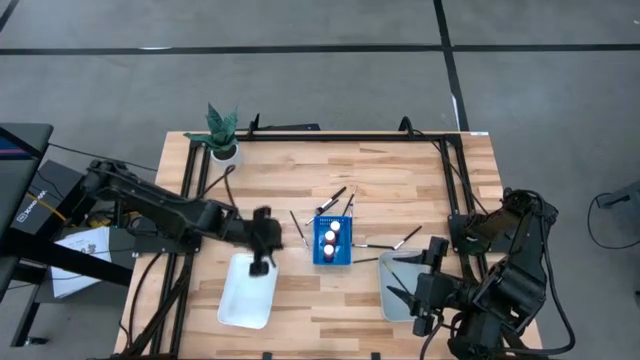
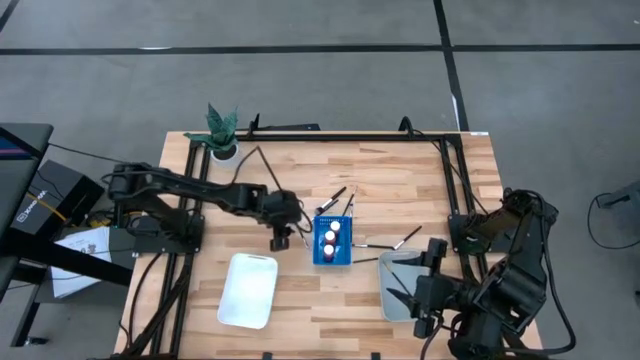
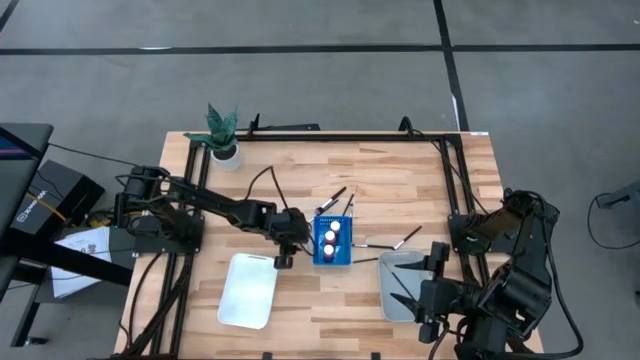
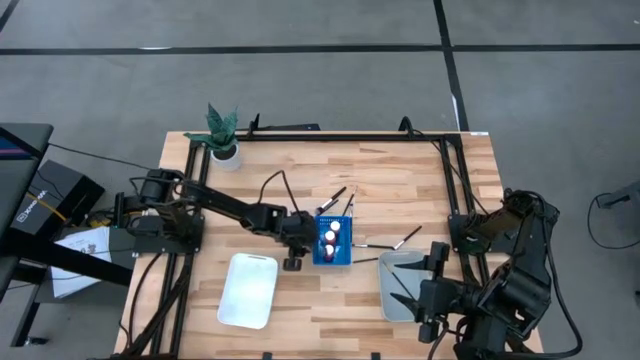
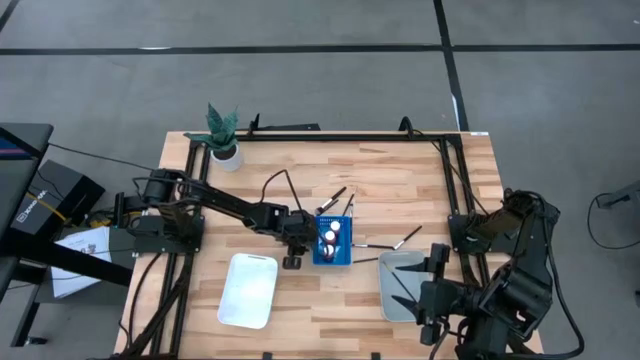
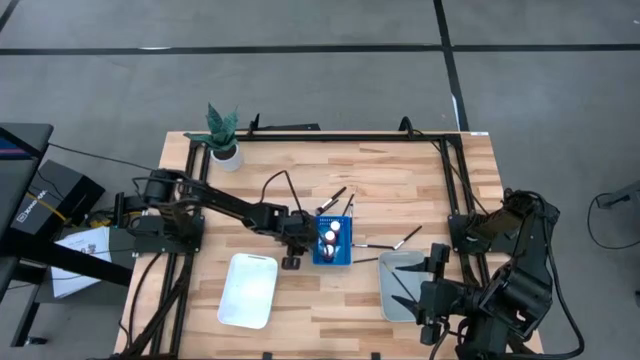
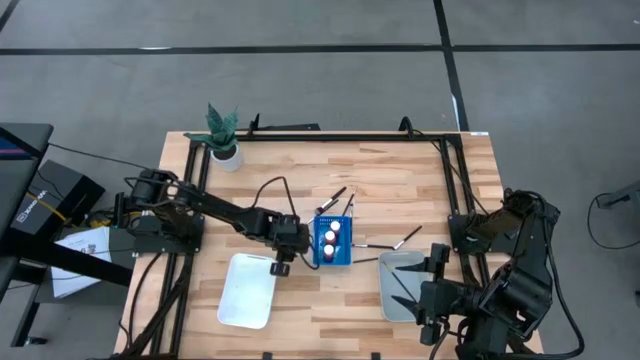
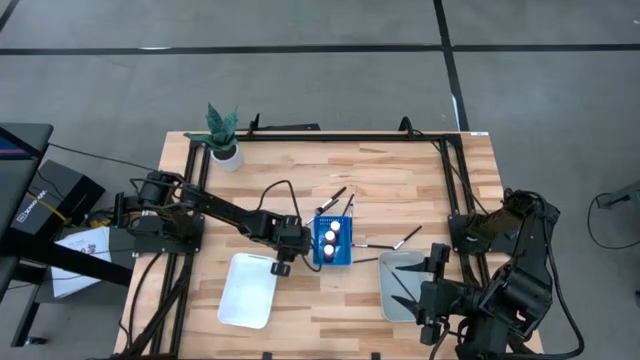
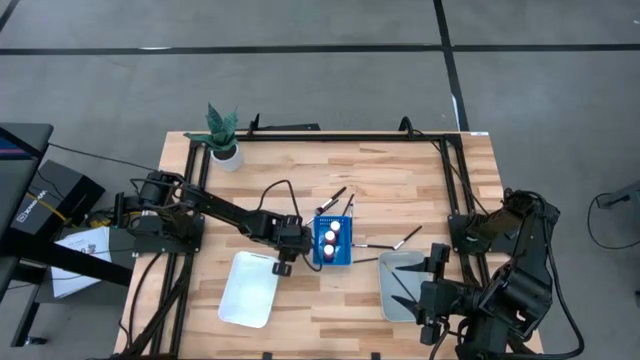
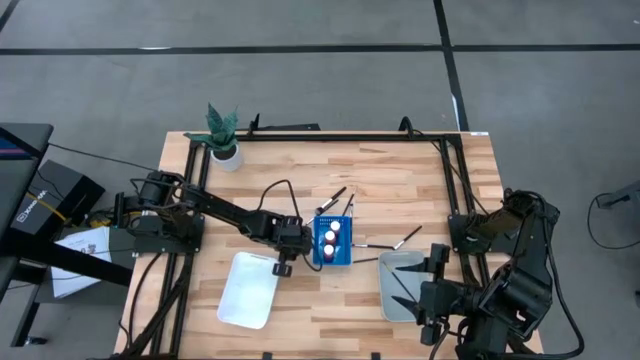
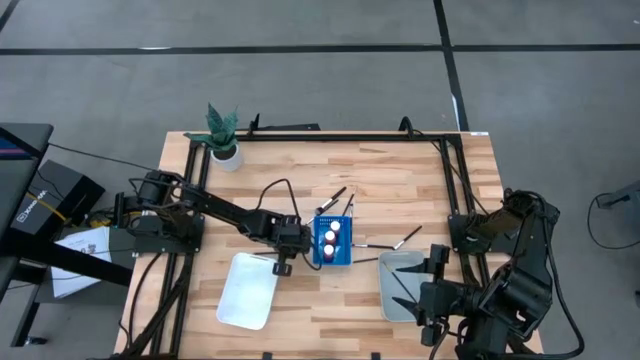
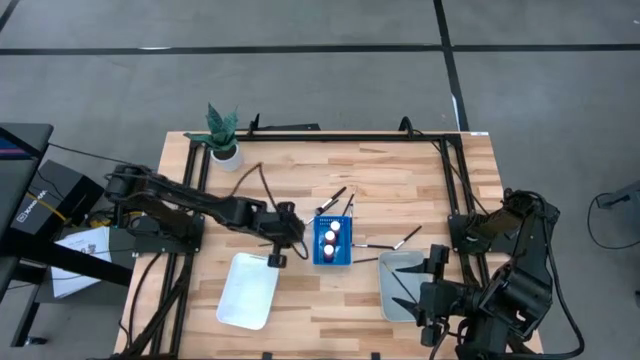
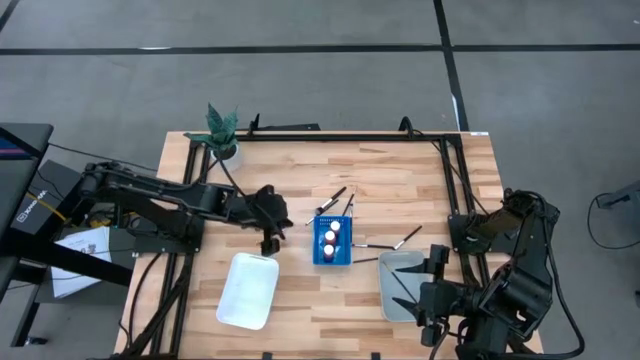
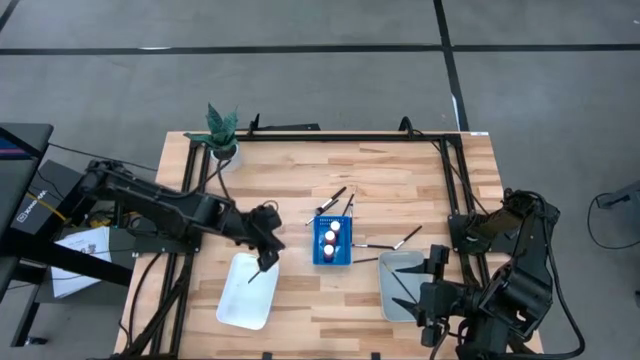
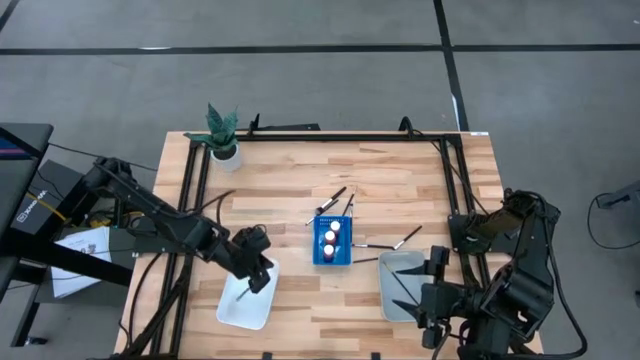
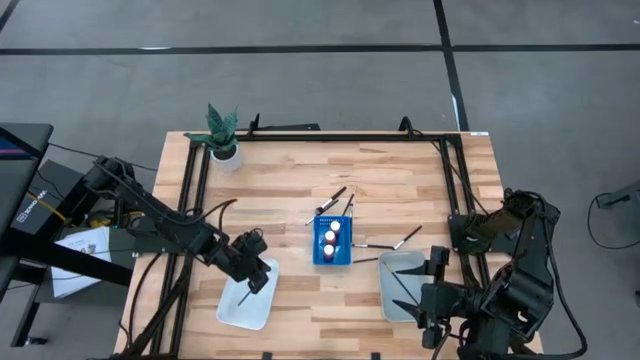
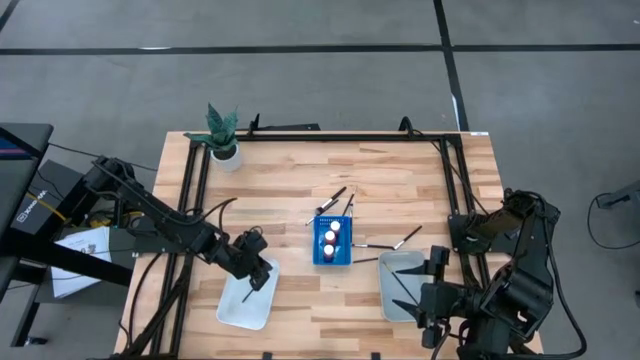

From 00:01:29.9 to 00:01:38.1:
Task: Pick & Place Paint Supplies
Put the left eyeshadow into the white bin

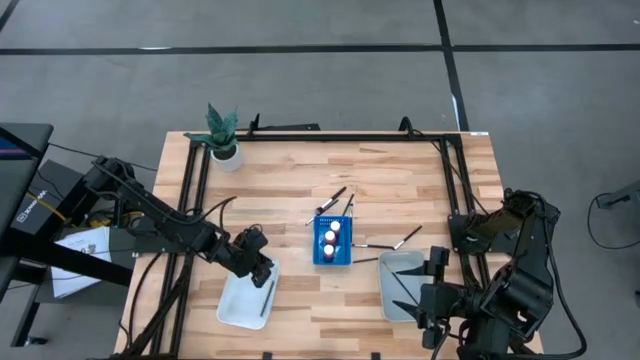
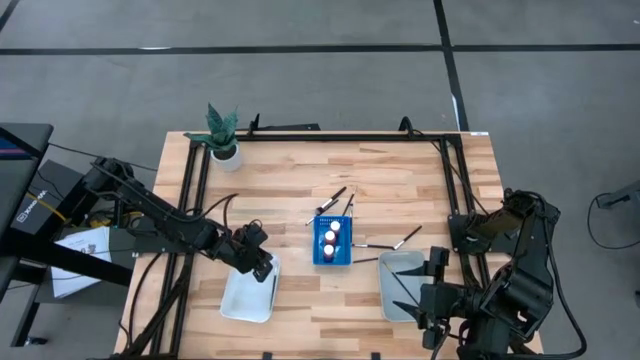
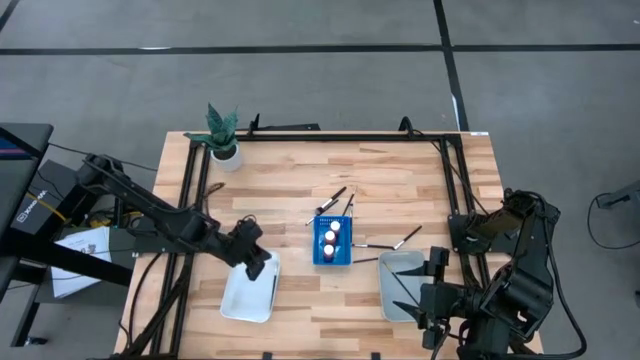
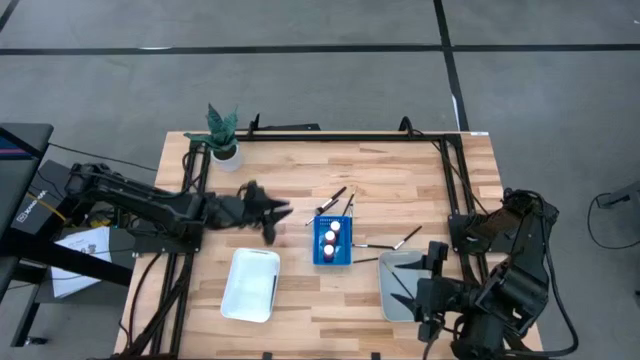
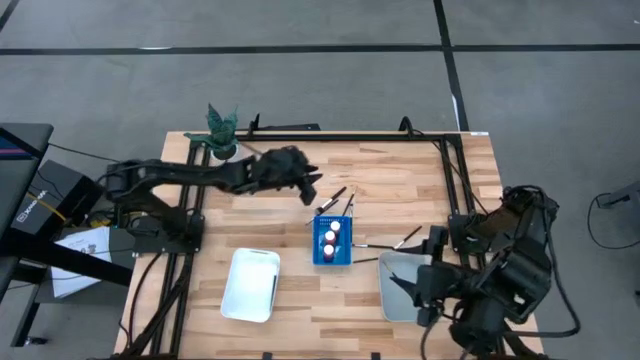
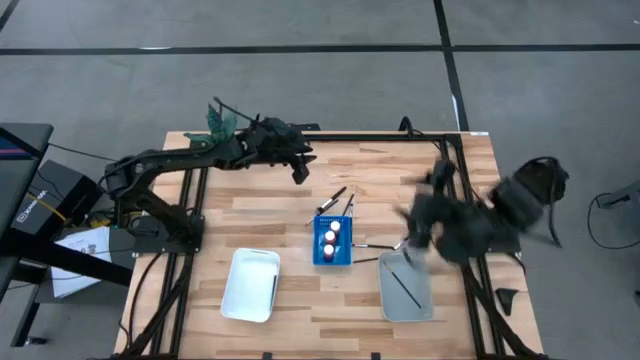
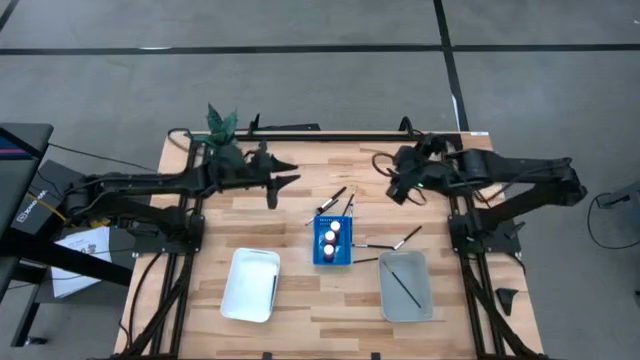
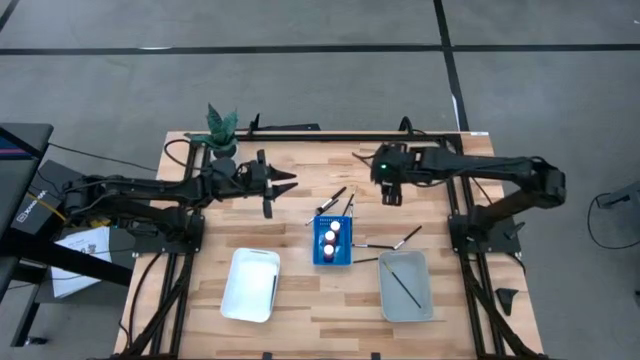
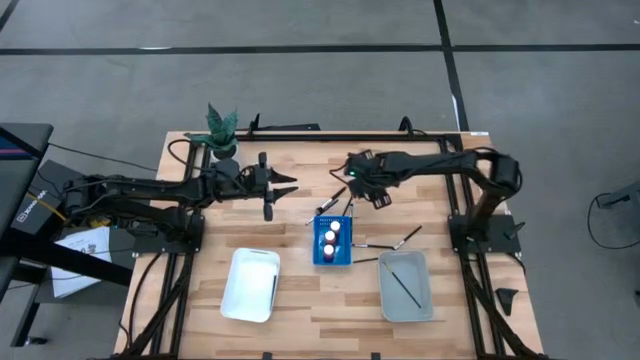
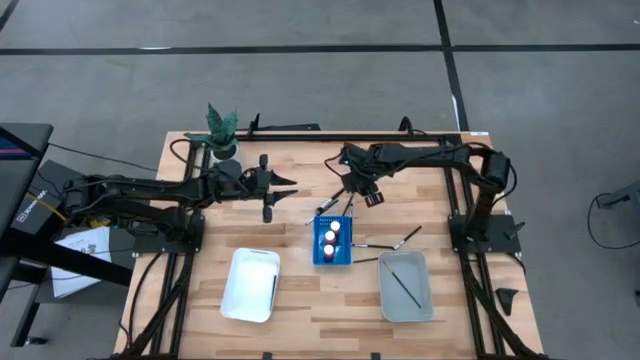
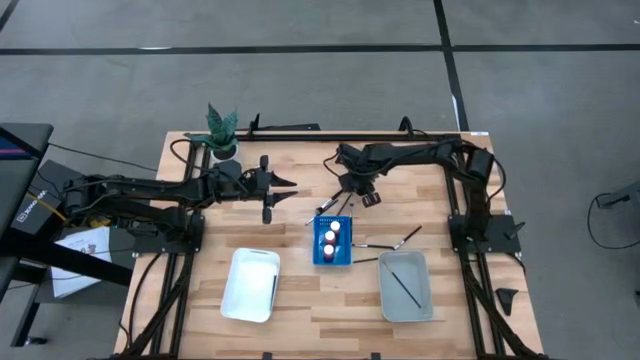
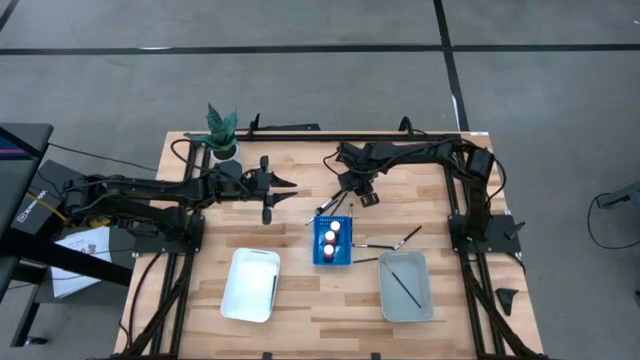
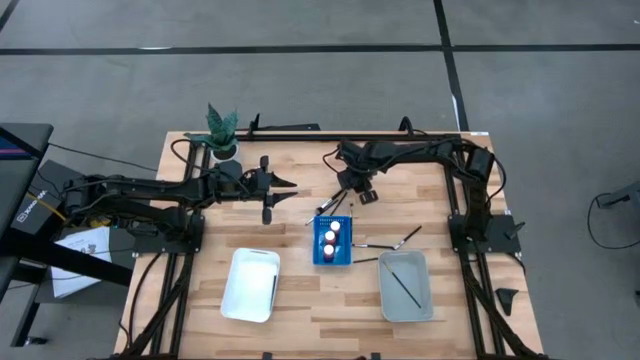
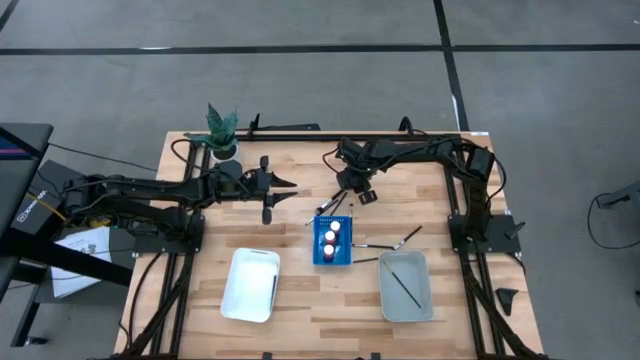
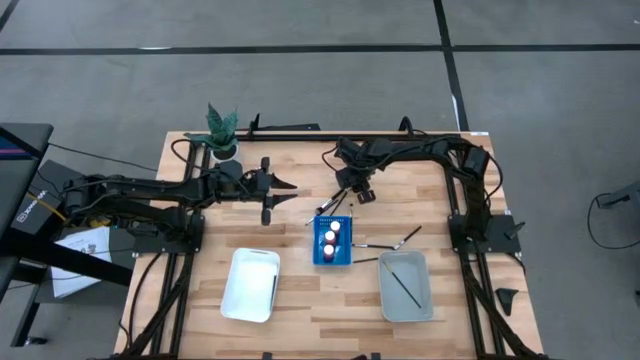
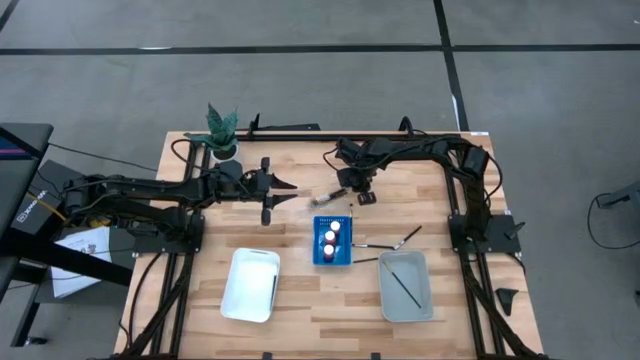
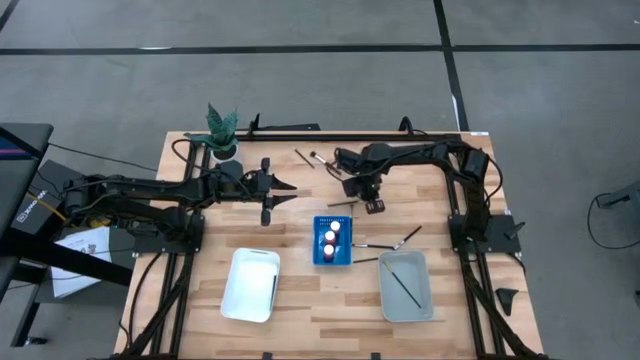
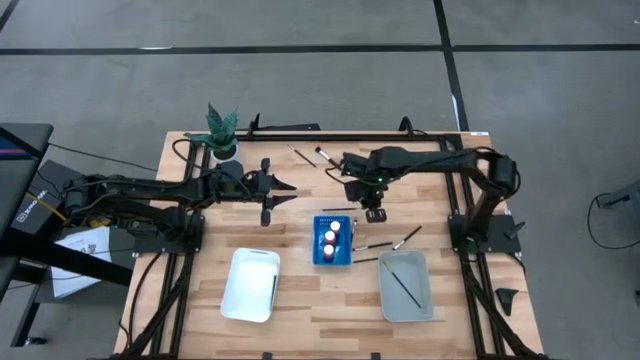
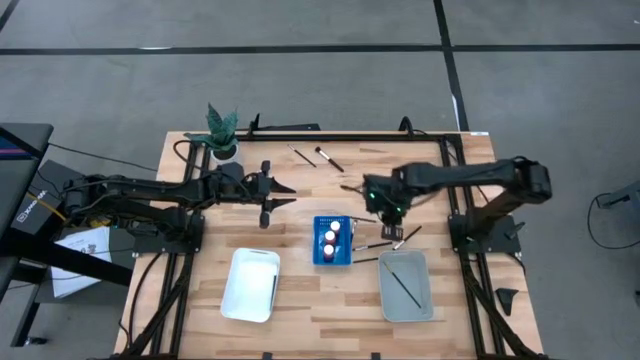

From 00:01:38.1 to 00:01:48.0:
Put the left liner brush into the white bin

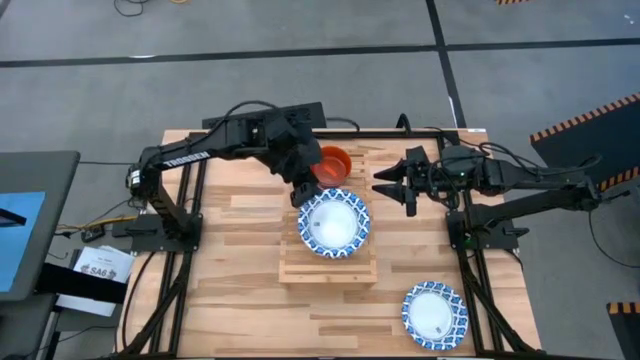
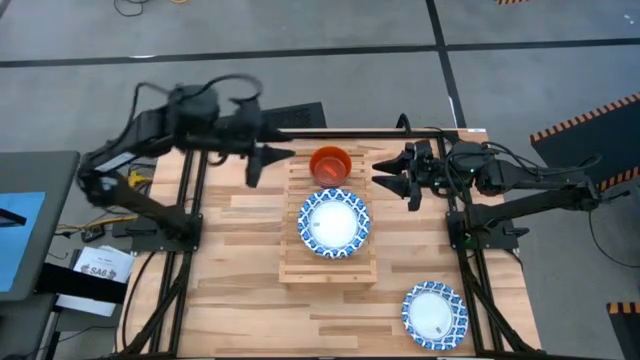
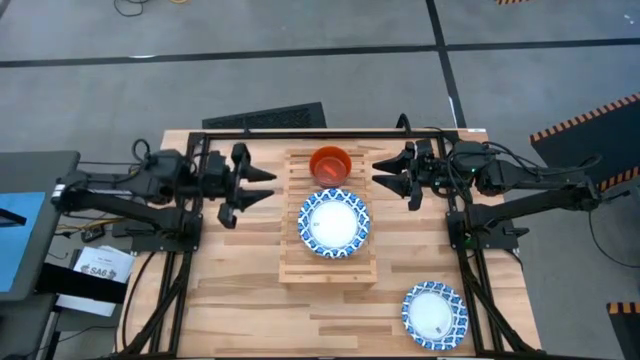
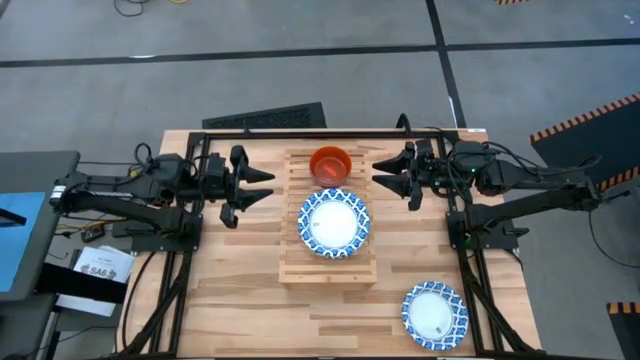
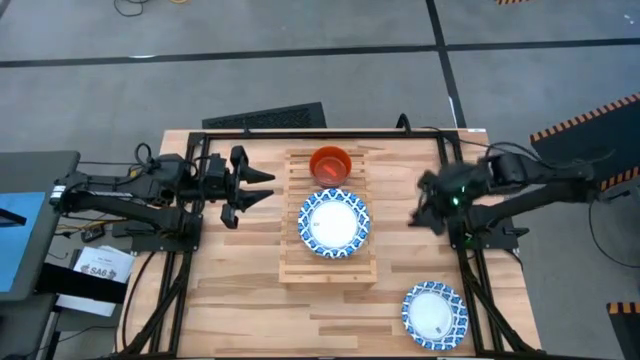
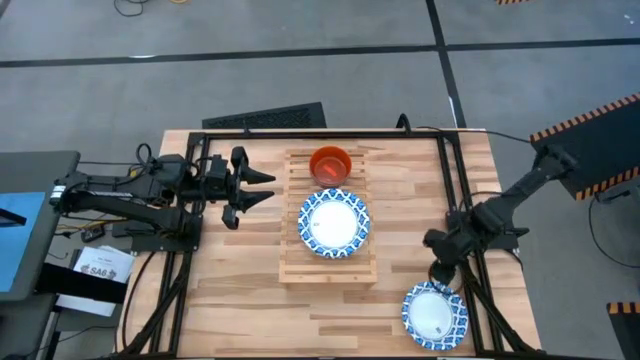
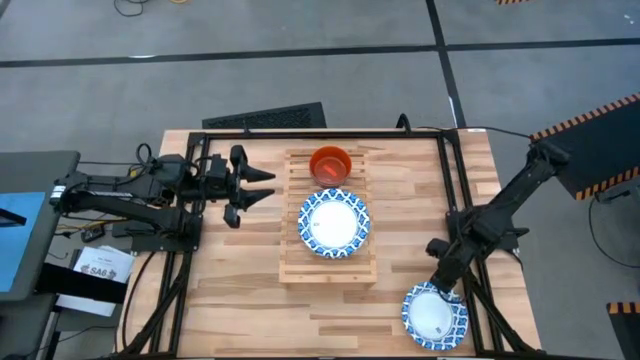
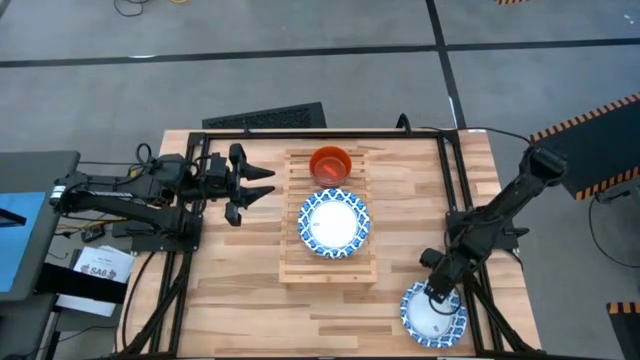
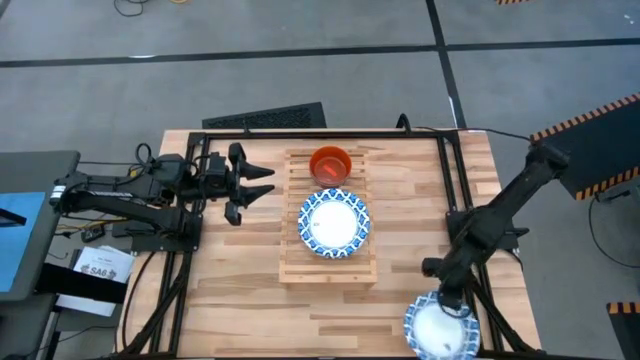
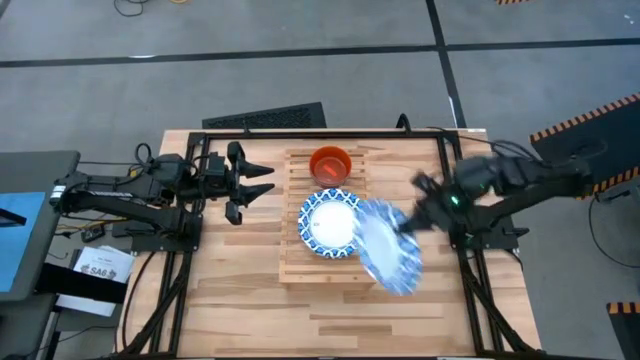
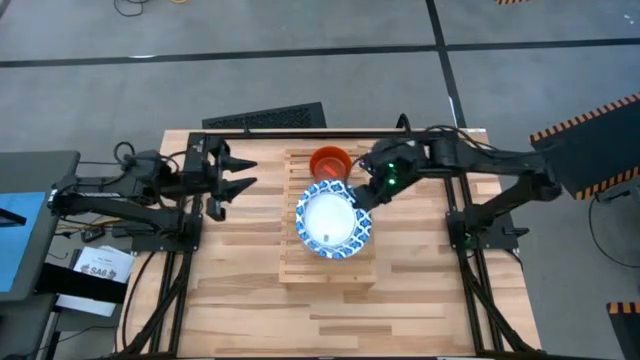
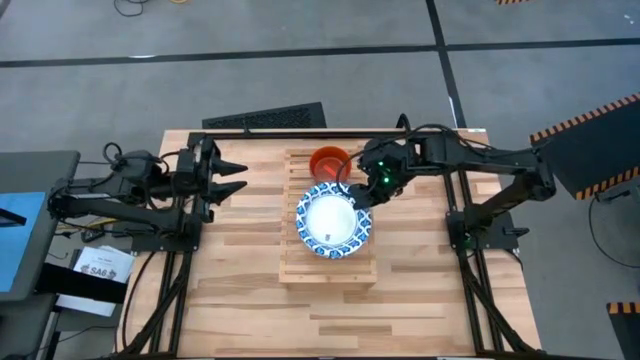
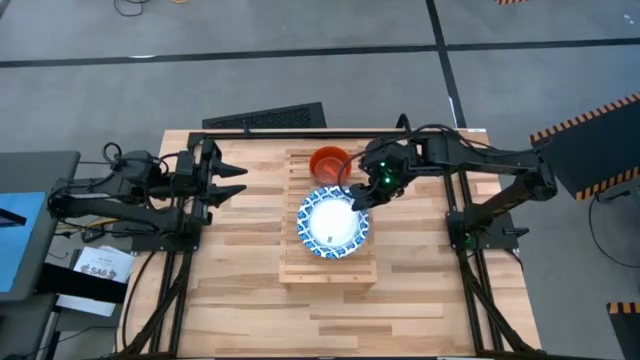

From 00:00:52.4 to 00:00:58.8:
Task: Place and stack bowls onto a shelf
Stack the white patterned bowl on top of the white patterned bowl on the shelf
